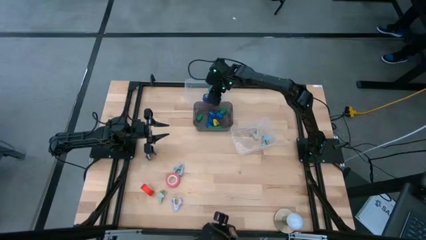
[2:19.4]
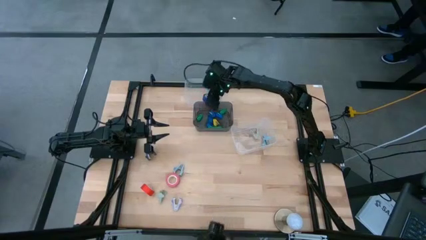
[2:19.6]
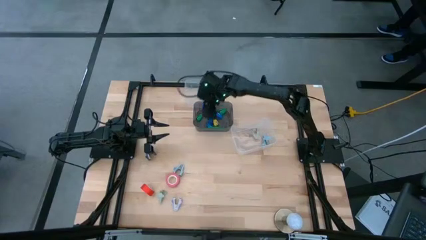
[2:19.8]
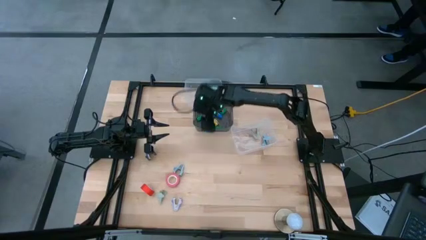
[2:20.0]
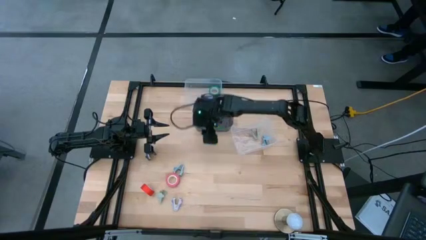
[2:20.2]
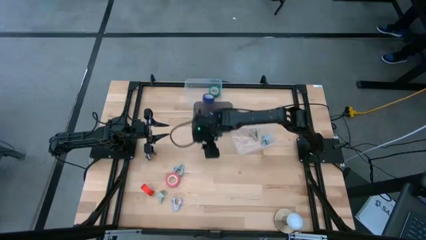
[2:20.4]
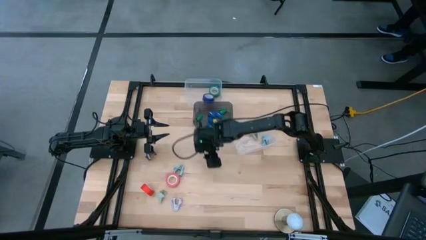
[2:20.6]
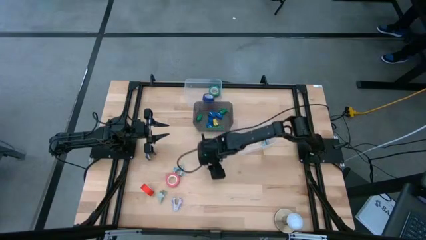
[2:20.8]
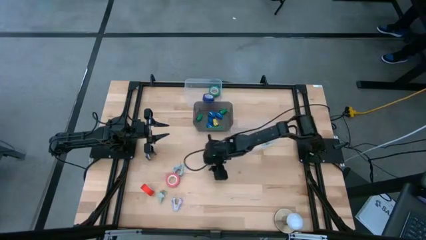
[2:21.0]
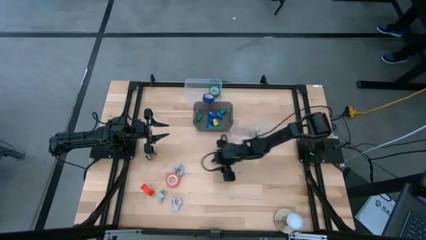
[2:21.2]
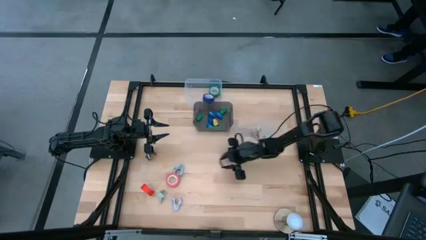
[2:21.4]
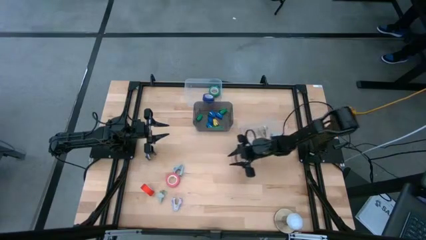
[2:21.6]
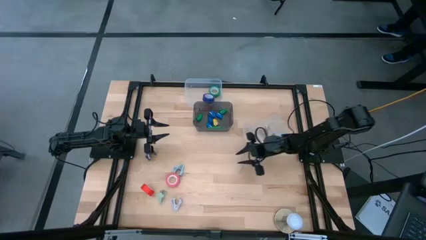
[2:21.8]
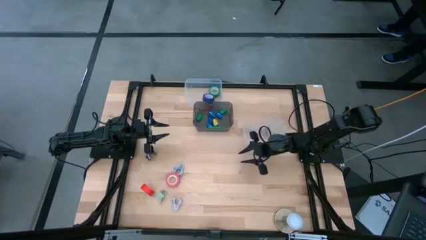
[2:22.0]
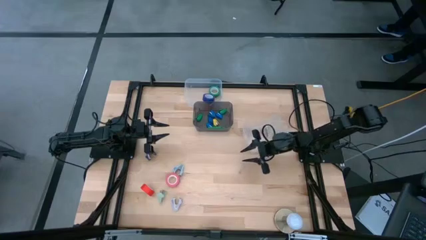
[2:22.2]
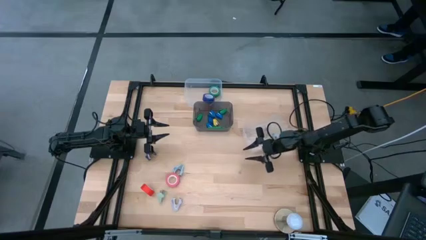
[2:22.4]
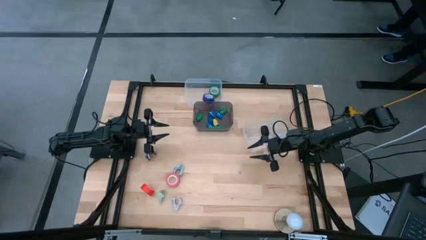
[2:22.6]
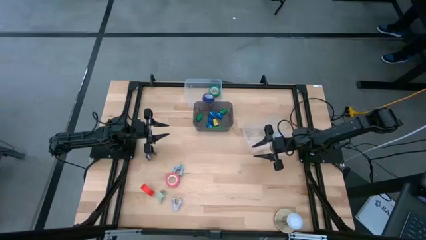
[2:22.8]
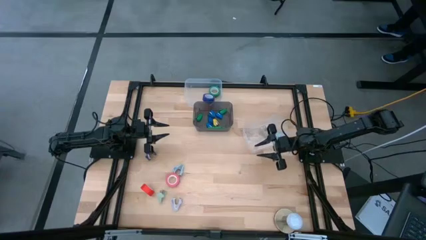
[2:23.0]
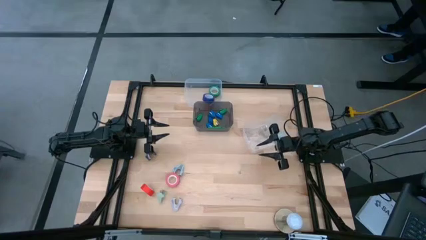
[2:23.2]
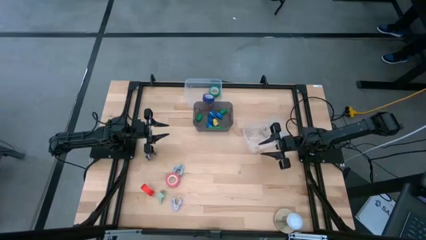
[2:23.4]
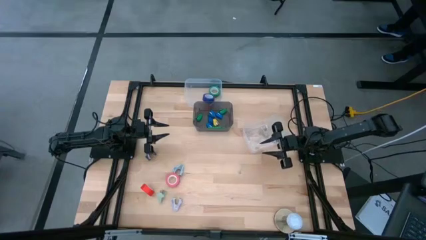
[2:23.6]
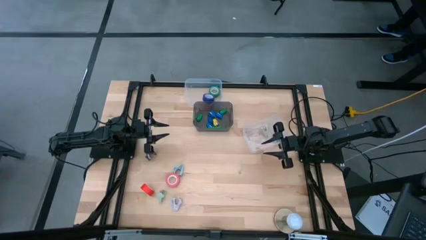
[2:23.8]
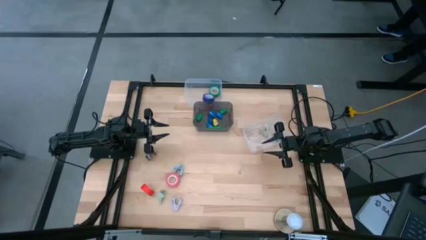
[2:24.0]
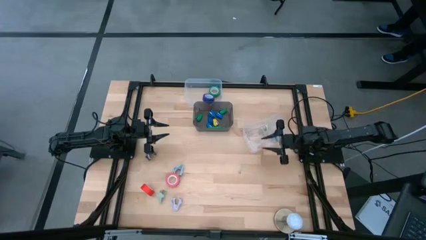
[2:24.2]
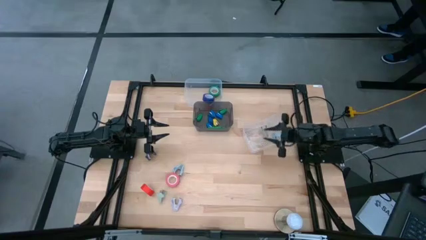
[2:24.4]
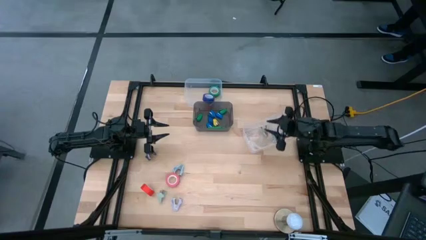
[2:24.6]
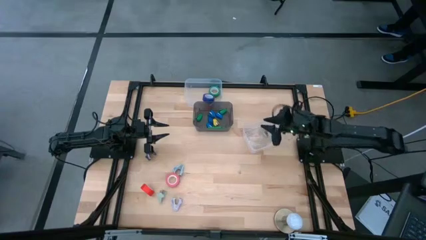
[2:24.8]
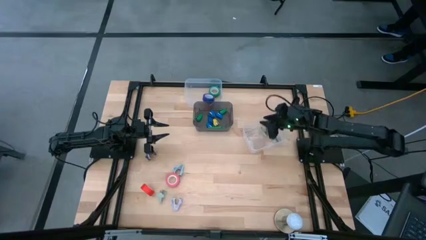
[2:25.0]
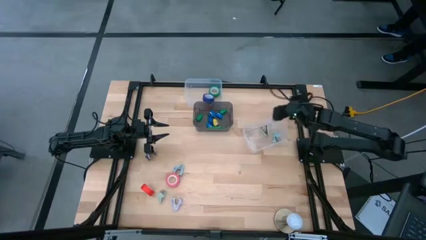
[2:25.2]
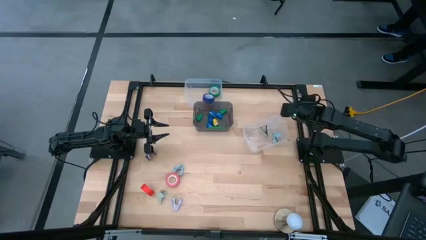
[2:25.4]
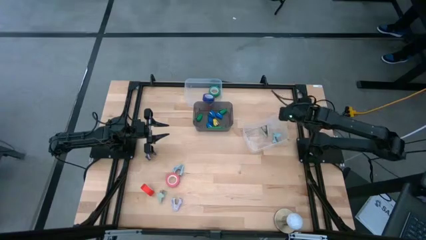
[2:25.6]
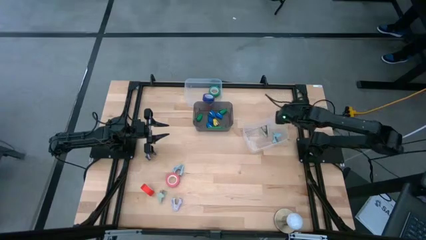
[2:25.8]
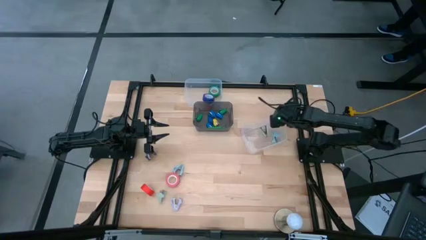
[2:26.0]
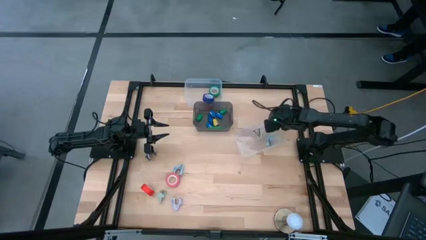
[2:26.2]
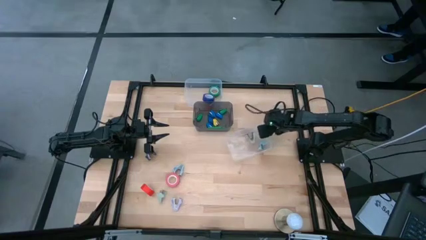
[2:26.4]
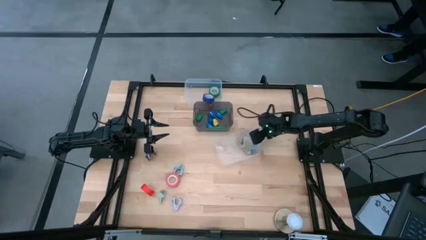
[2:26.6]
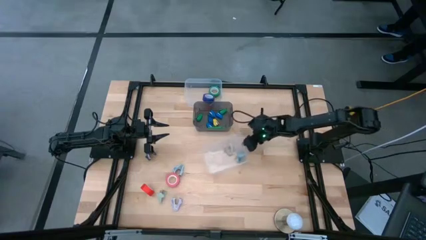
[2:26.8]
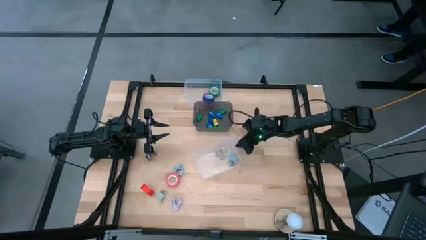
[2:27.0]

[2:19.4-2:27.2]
Task: Pick and place Stapler, Stapler remover, tape
Adjust the bottom transparent bin on the table

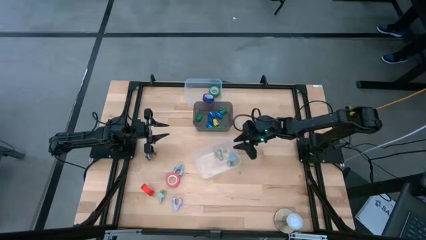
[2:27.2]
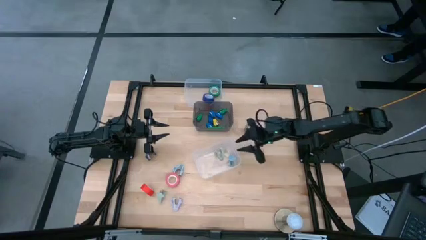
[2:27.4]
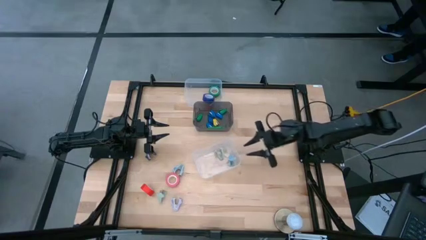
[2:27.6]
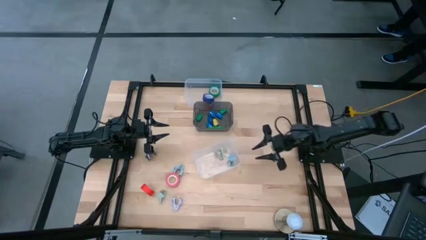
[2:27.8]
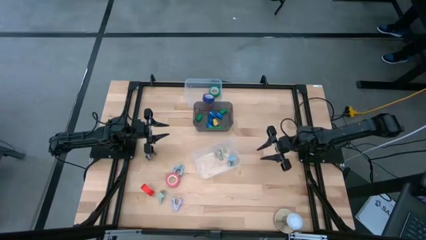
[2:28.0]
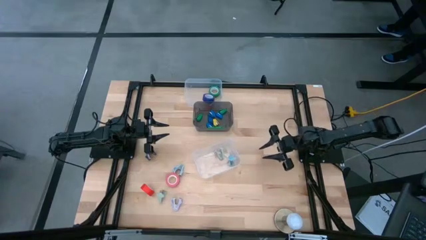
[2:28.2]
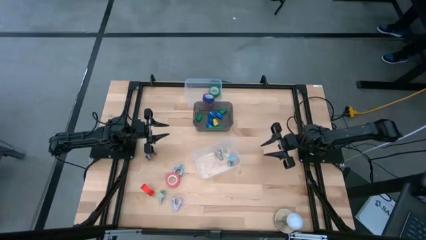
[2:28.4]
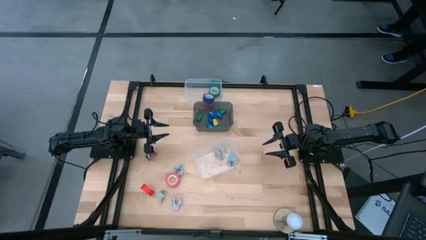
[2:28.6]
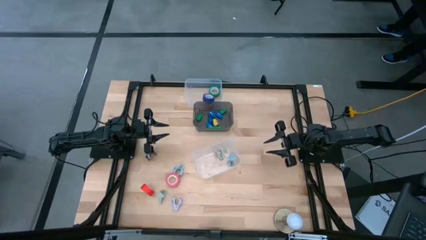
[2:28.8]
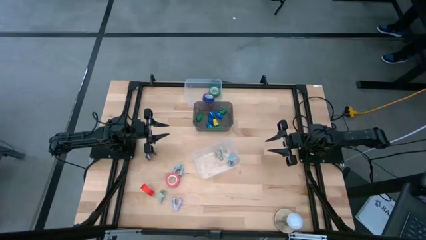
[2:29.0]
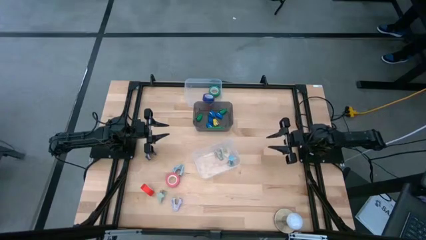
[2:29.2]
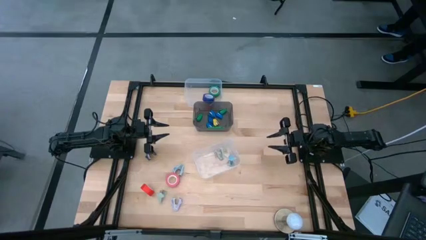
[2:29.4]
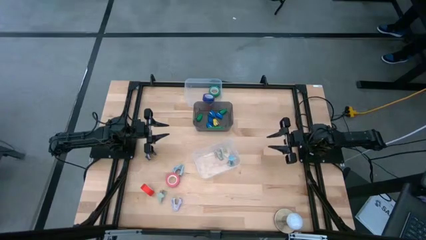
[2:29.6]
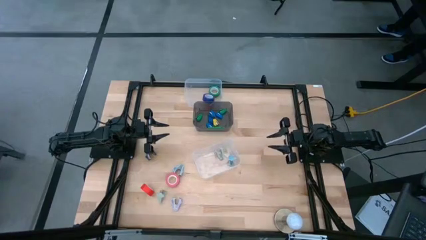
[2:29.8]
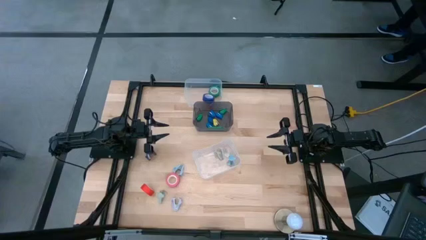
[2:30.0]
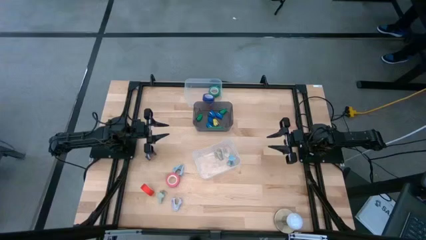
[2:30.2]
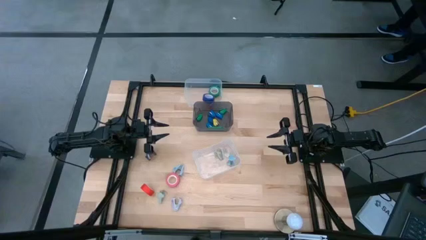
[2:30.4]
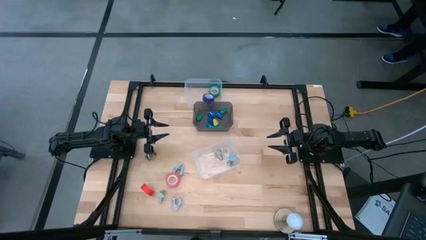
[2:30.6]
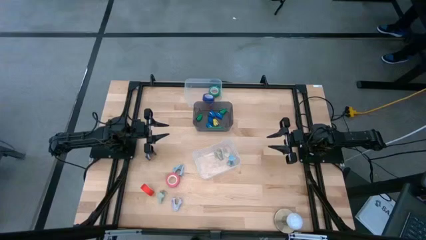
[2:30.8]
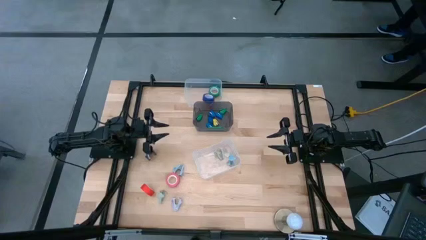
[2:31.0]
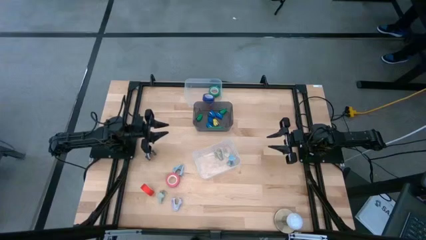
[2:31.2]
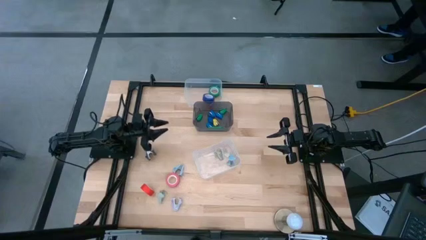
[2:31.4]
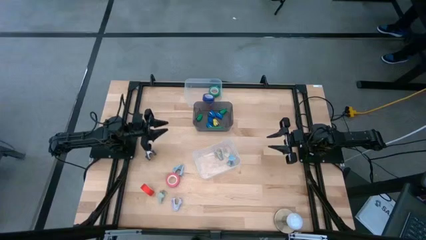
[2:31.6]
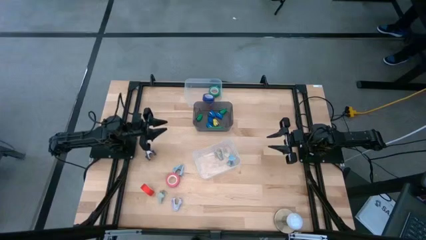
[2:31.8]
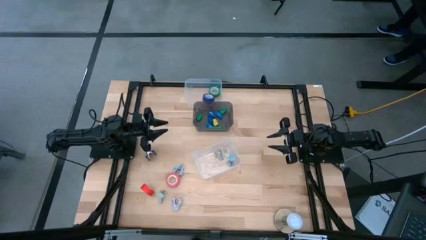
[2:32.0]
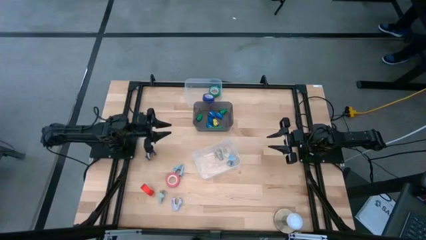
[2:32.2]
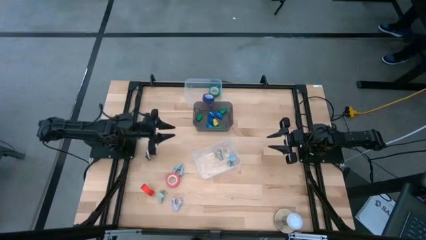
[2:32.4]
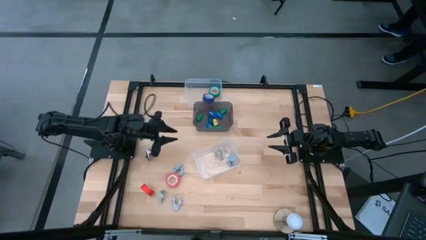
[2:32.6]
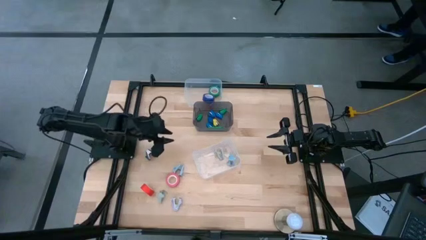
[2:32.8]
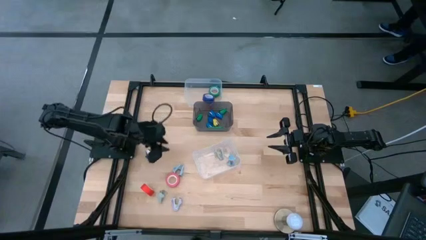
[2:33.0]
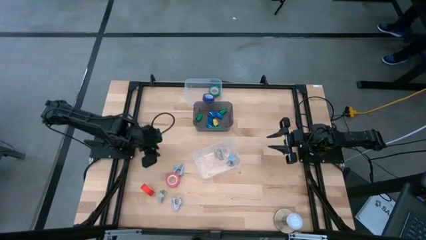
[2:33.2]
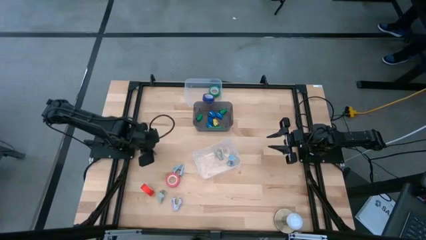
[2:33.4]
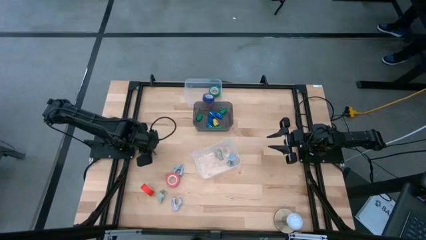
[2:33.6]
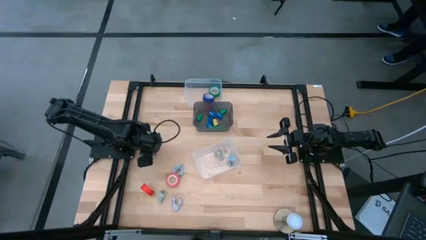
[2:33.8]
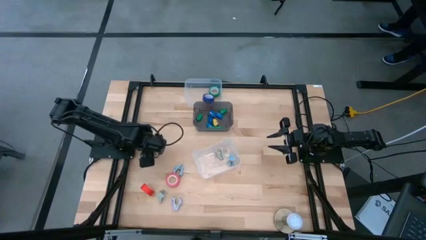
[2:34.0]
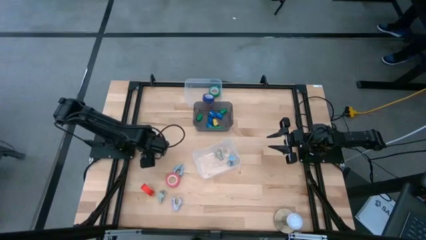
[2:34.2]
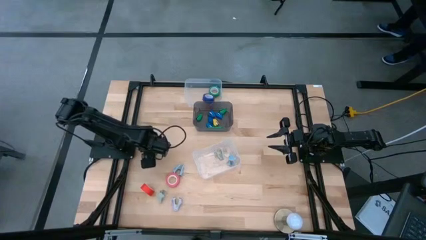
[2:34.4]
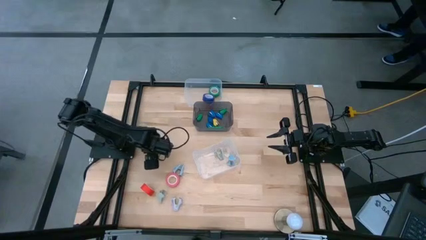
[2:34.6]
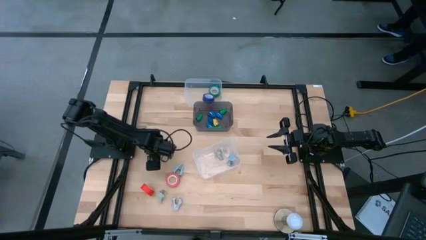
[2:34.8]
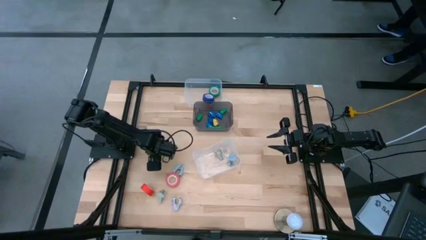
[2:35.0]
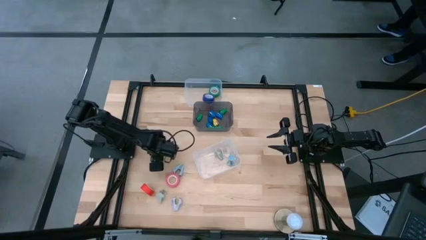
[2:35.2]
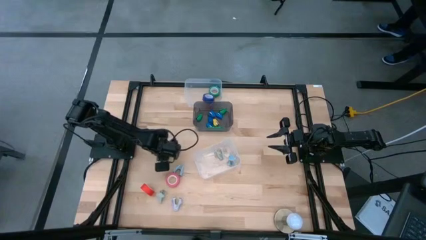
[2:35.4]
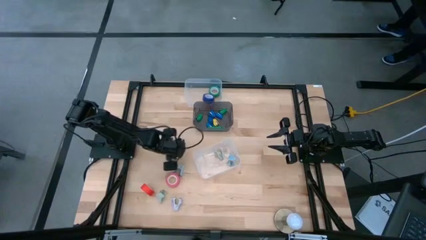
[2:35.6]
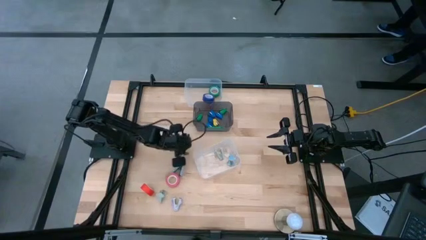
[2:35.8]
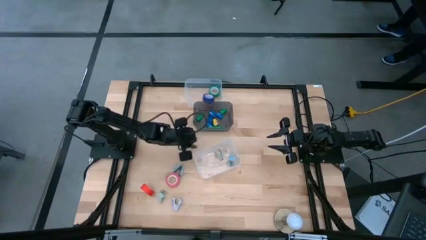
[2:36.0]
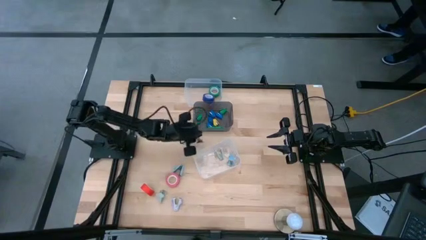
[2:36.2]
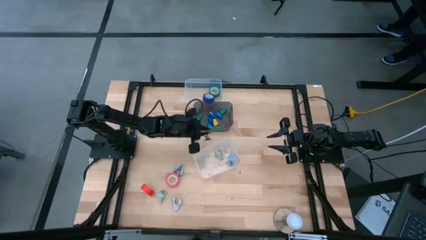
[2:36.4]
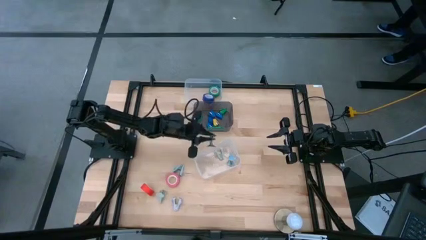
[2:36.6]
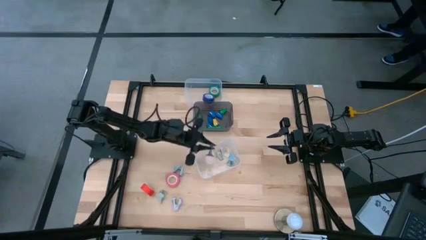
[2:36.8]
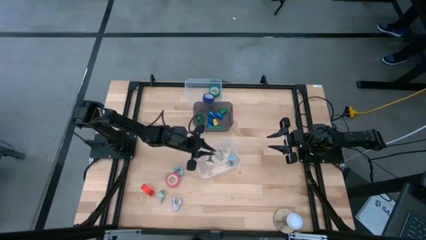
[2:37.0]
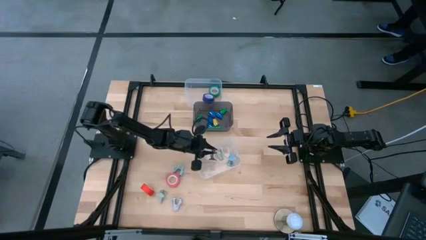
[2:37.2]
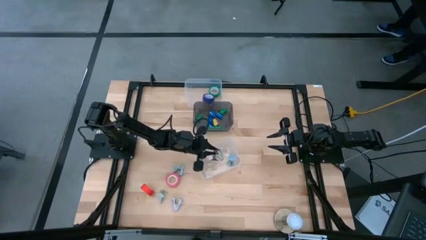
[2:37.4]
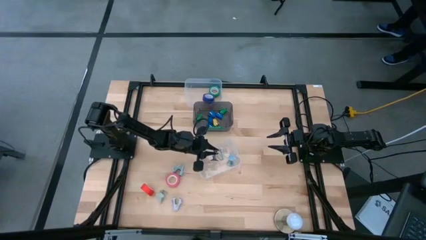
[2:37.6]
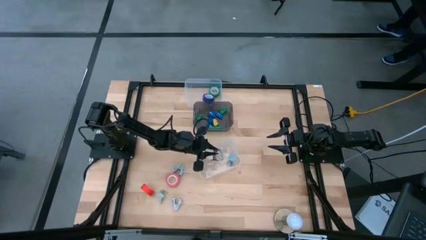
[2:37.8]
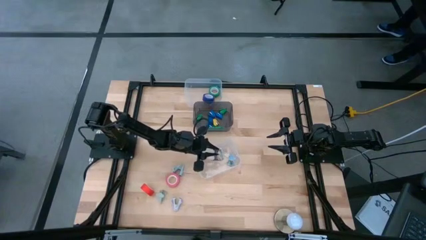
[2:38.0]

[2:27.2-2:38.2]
Put the black staple remover into the bottom transparent bin
